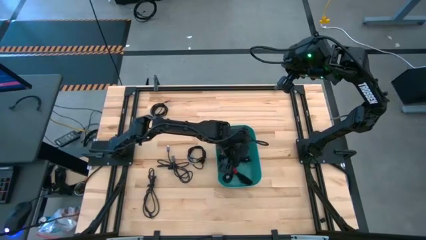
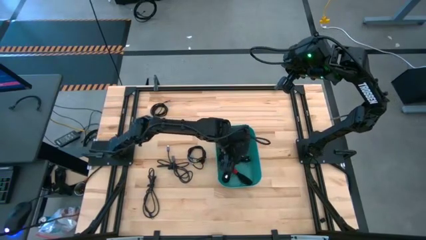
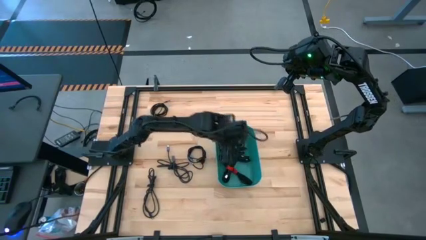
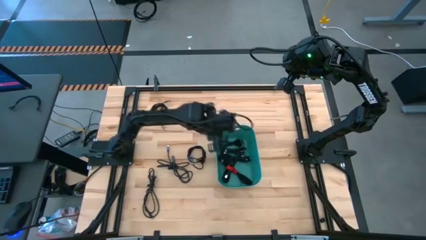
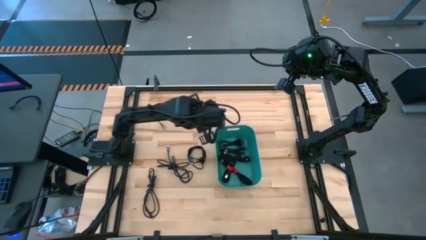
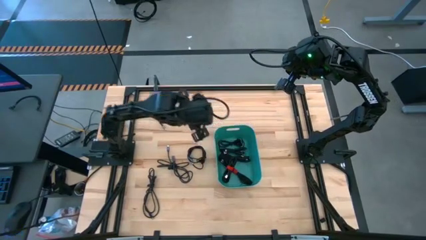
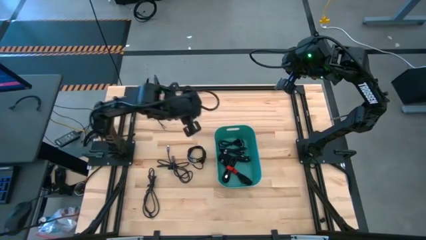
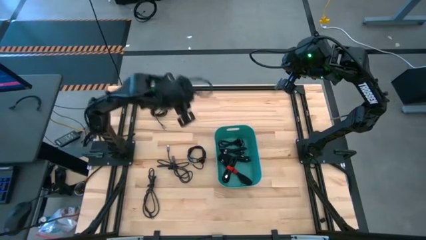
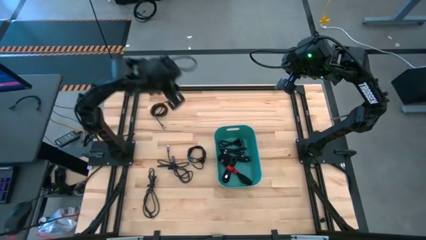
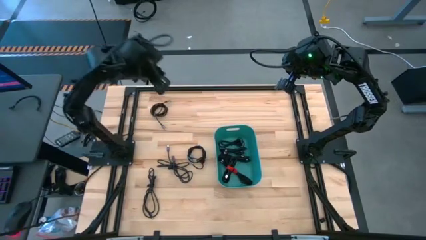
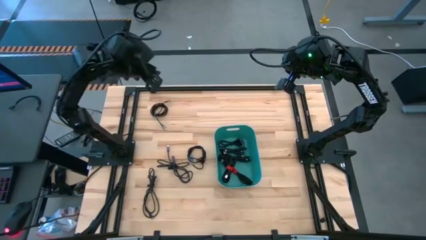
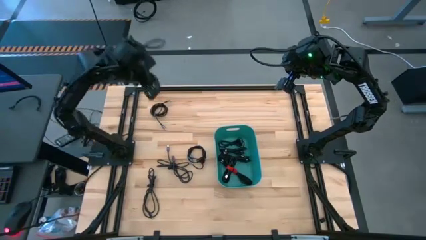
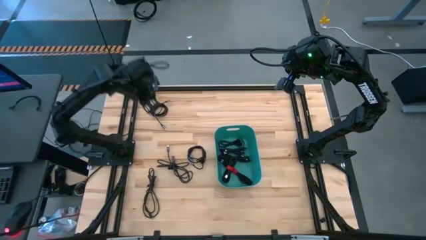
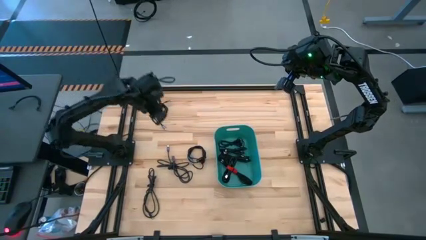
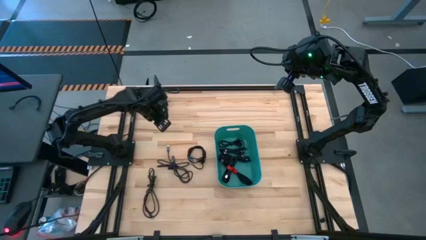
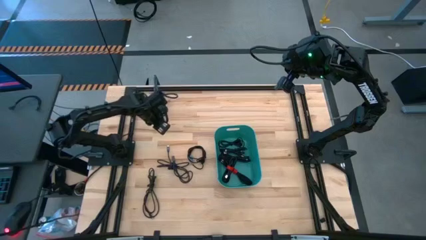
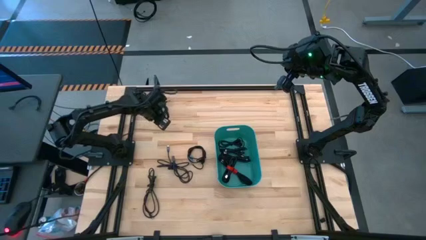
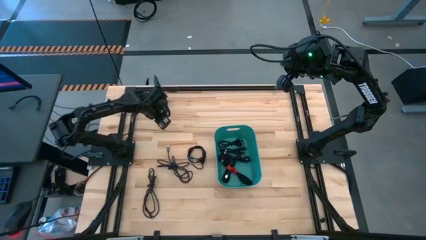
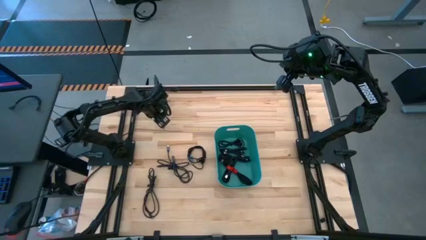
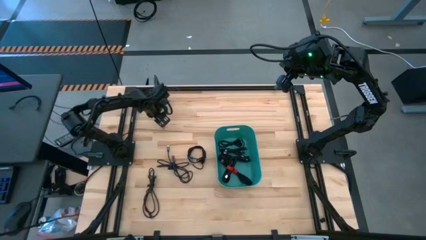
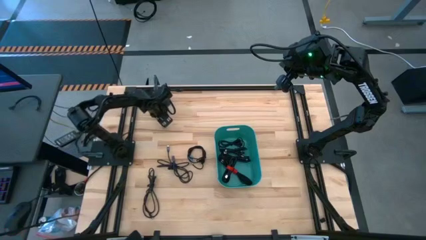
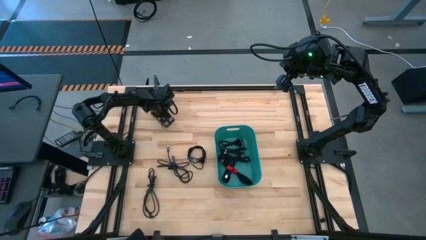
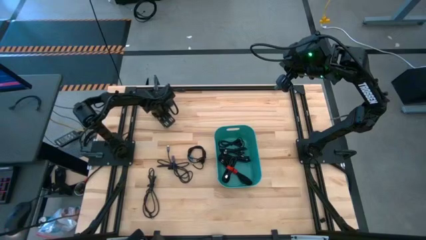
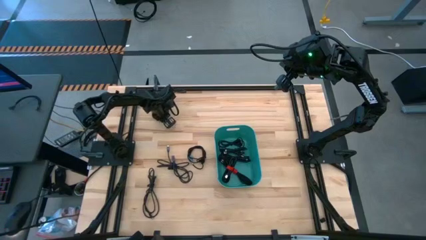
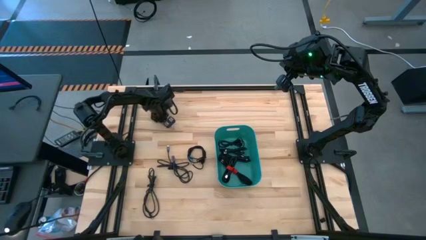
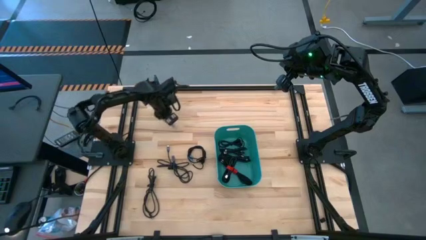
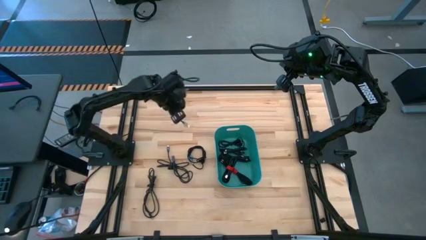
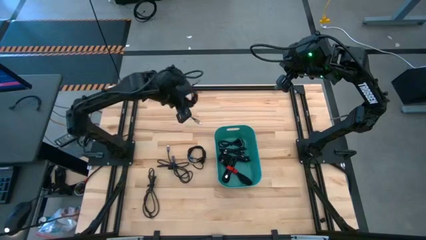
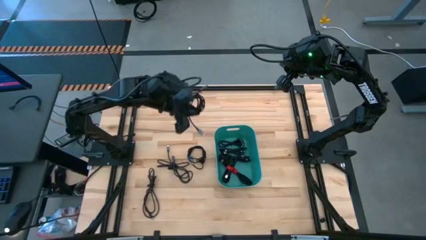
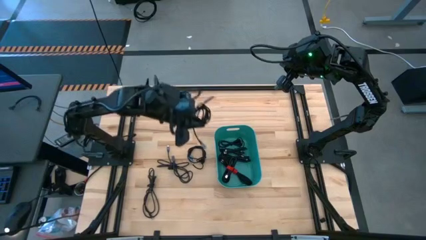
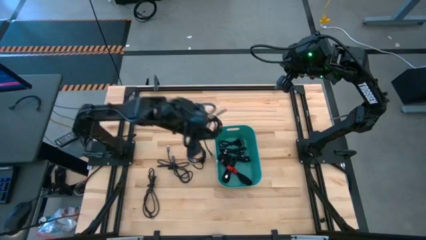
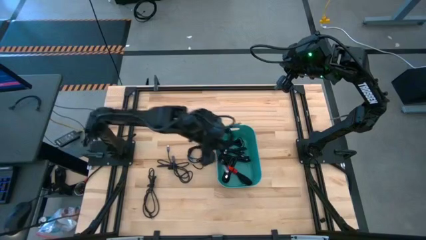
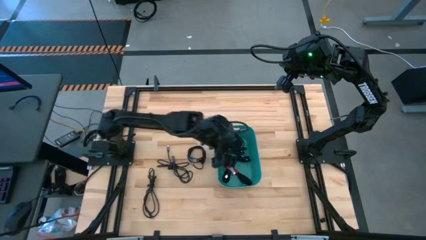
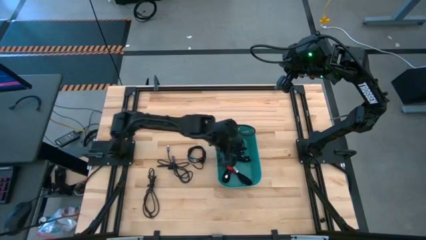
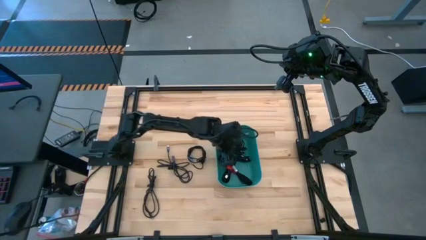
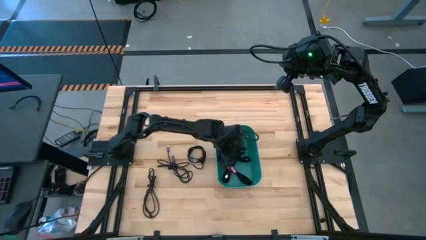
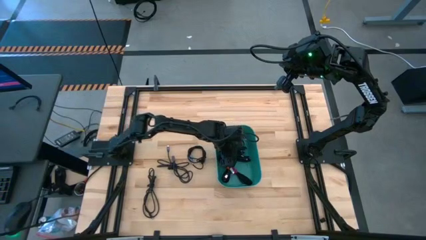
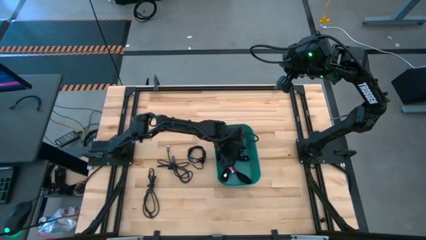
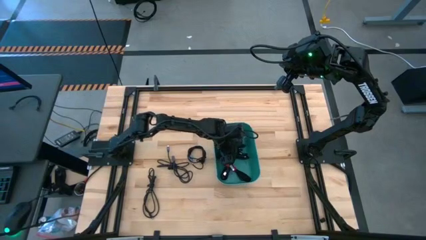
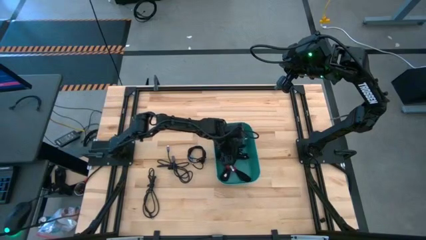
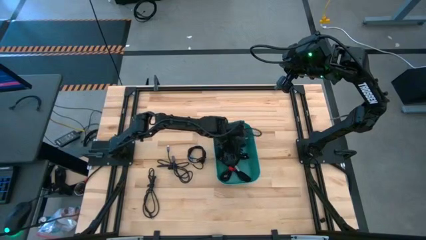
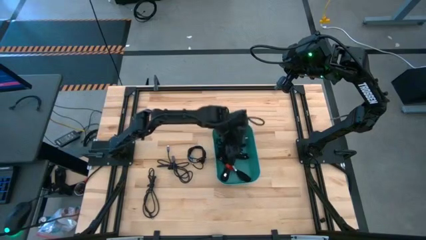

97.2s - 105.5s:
Task: Pick and place USB-C Cables
Put the black charger cable into the green bin

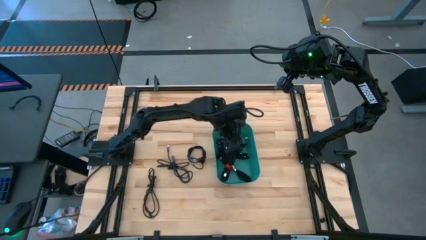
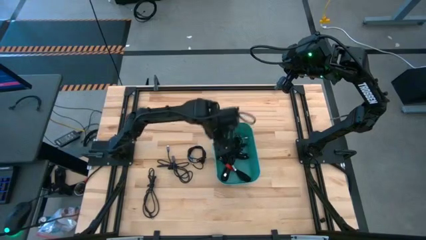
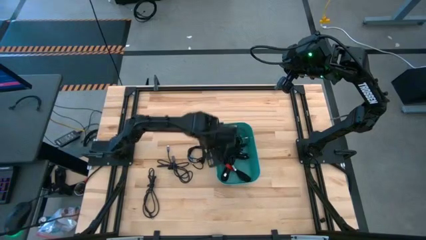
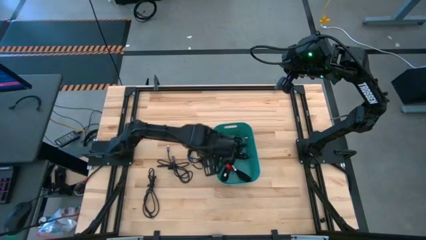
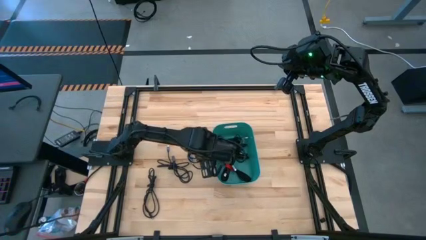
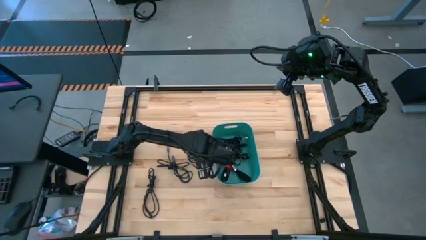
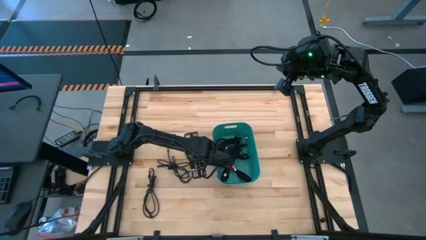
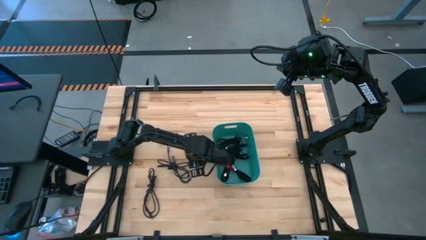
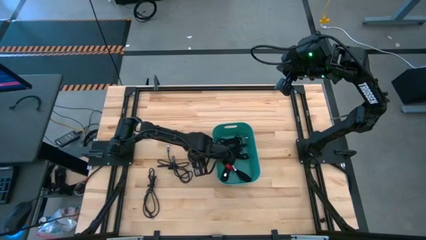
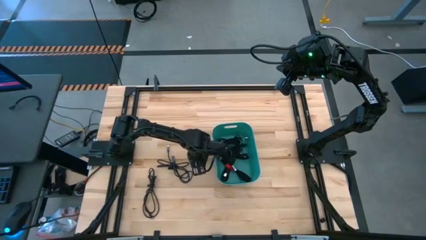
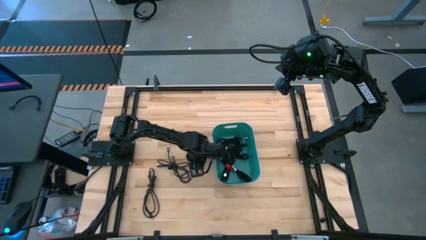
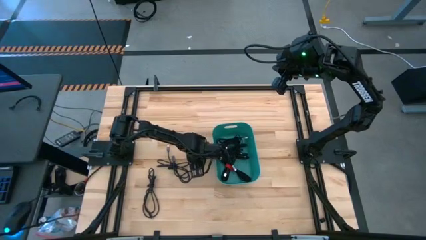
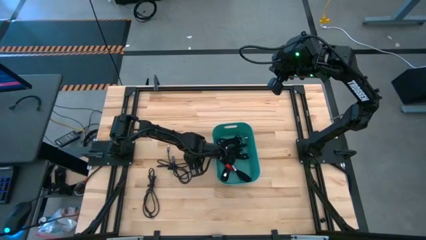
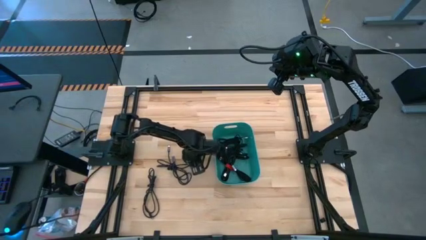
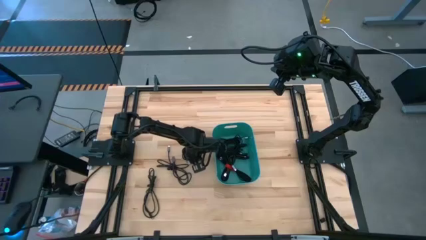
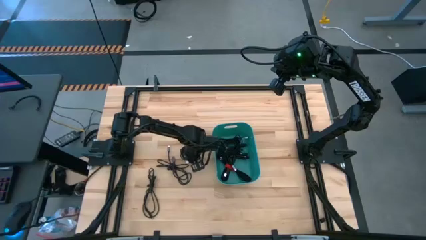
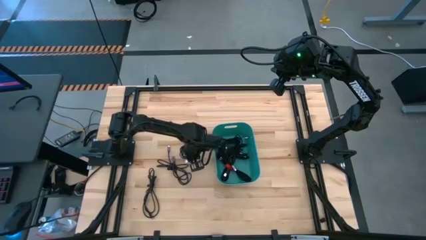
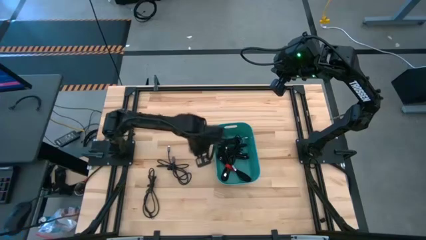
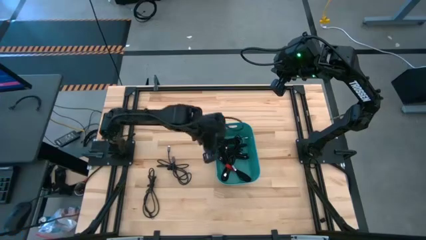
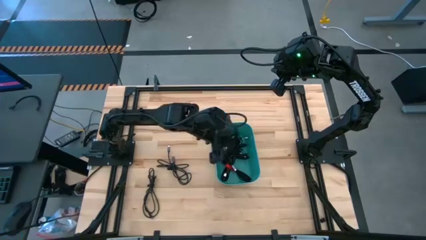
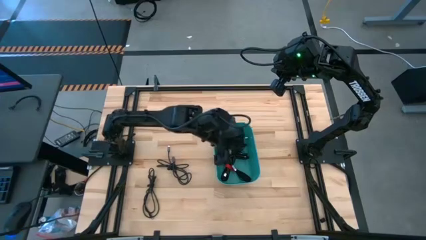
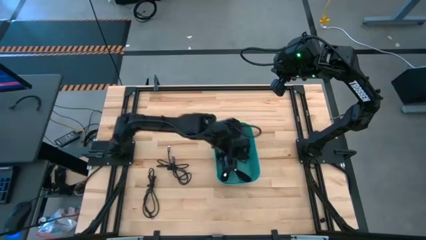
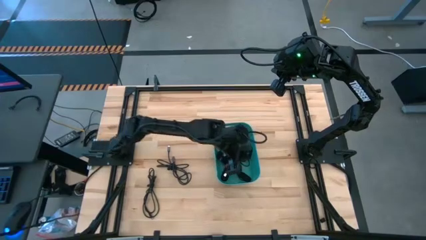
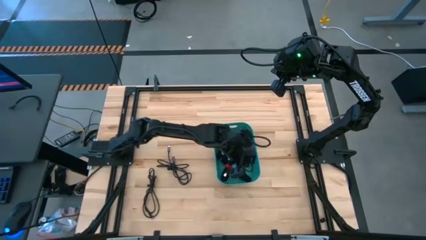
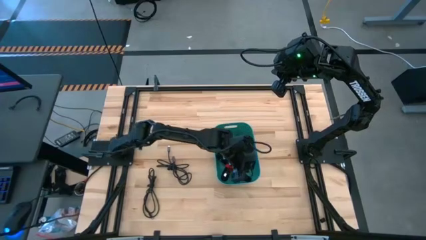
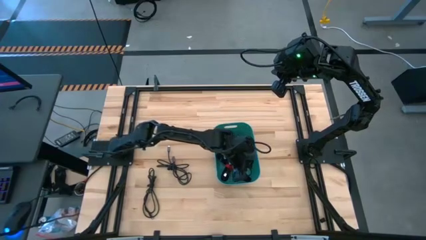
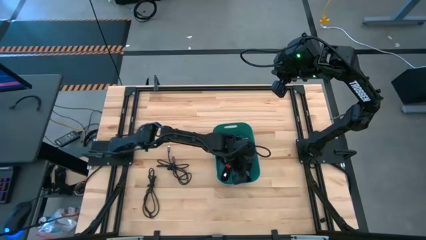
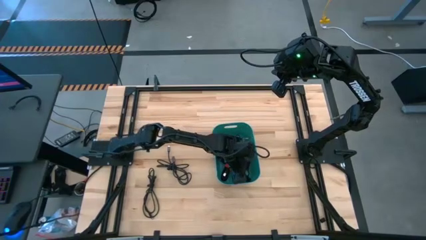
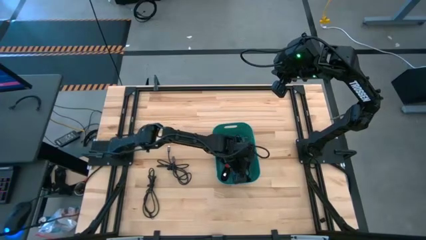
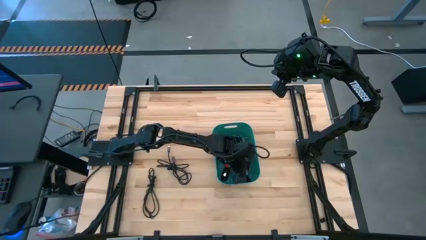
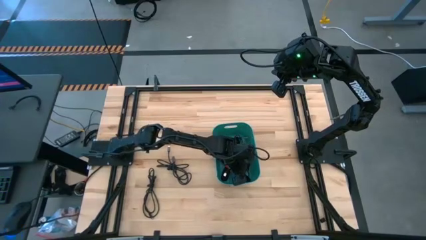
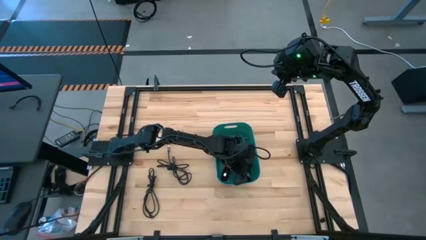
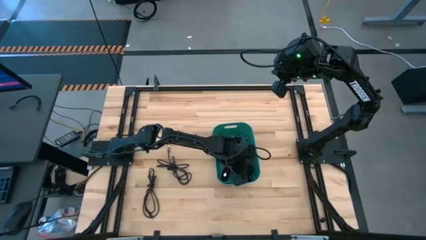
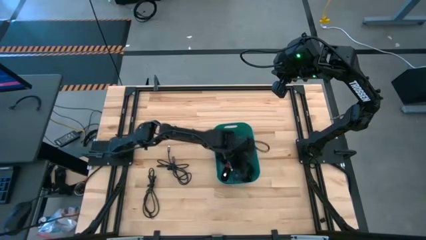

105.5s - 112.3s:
Put the top black charger cable into the green bin
